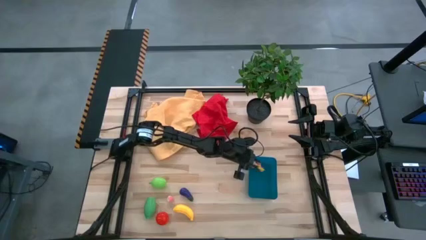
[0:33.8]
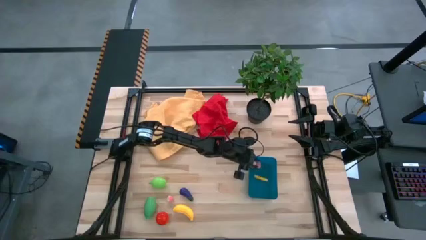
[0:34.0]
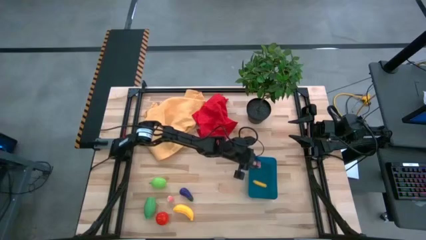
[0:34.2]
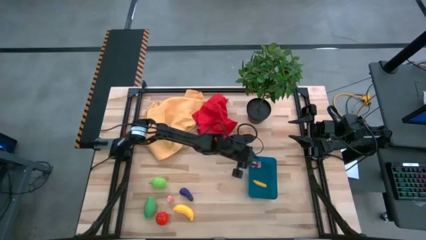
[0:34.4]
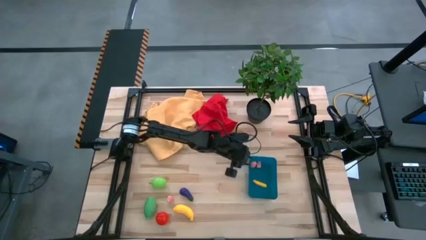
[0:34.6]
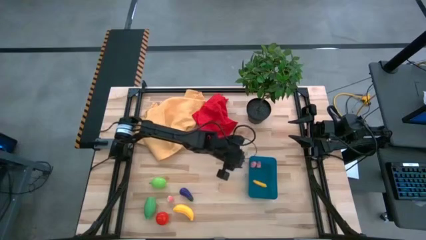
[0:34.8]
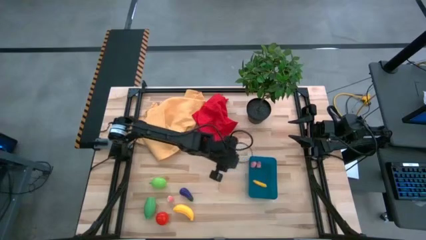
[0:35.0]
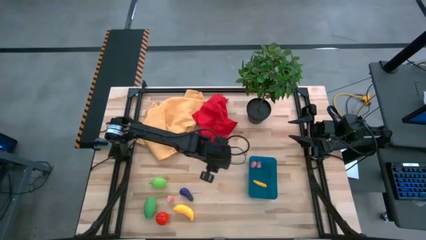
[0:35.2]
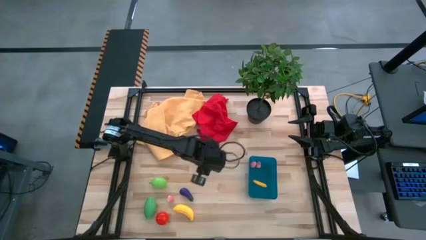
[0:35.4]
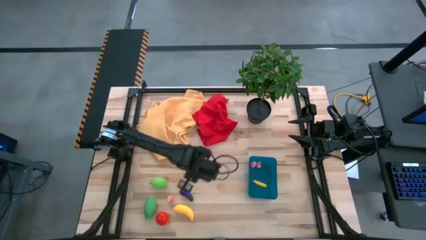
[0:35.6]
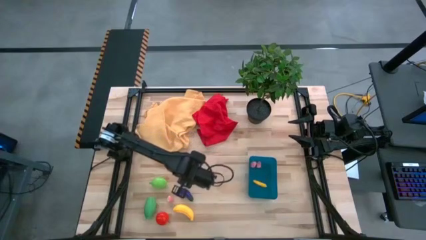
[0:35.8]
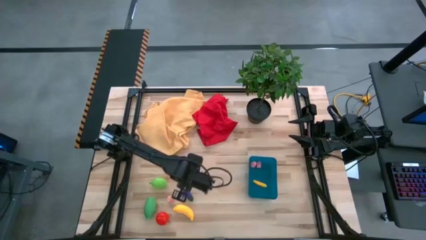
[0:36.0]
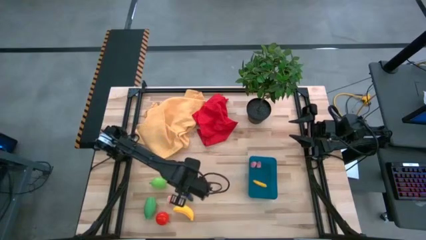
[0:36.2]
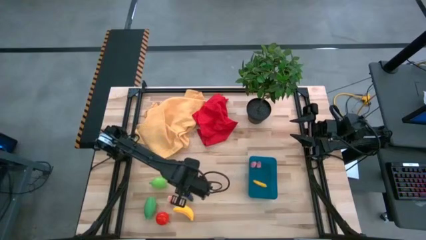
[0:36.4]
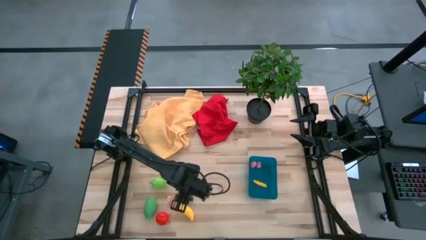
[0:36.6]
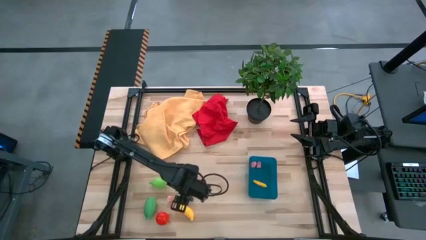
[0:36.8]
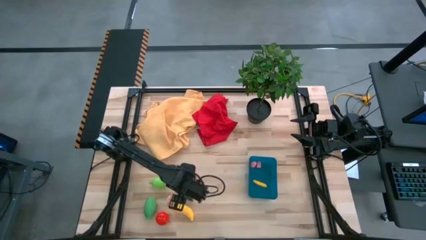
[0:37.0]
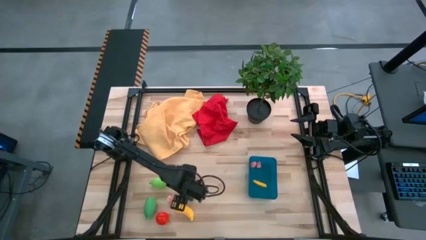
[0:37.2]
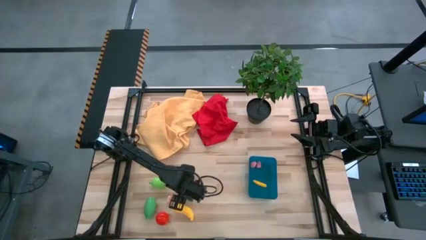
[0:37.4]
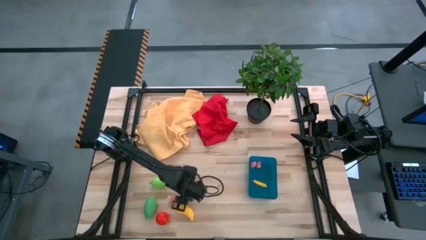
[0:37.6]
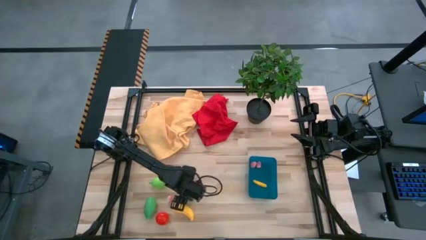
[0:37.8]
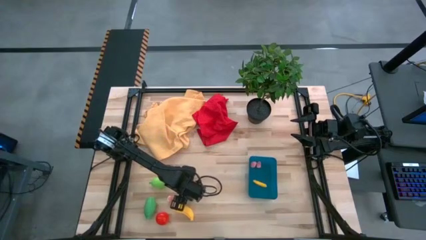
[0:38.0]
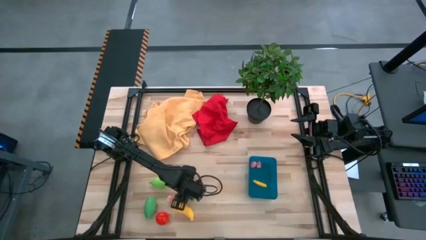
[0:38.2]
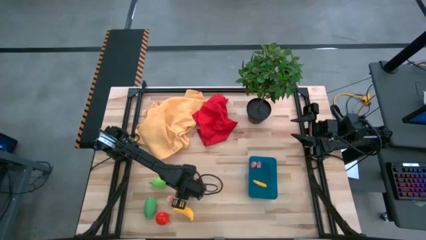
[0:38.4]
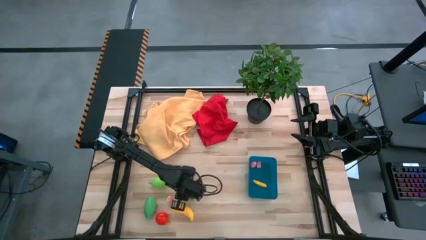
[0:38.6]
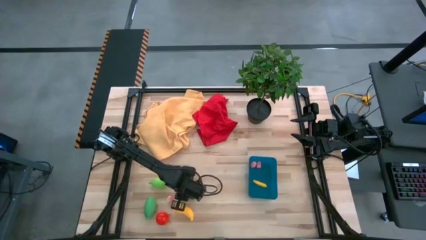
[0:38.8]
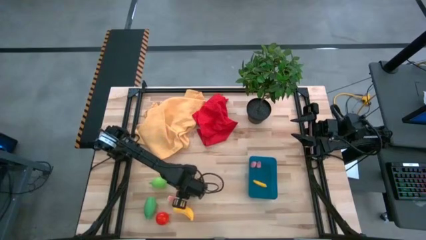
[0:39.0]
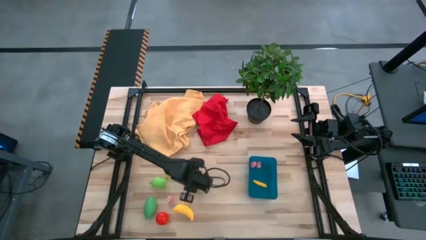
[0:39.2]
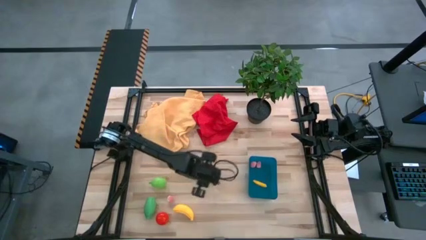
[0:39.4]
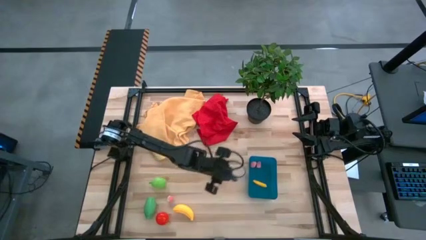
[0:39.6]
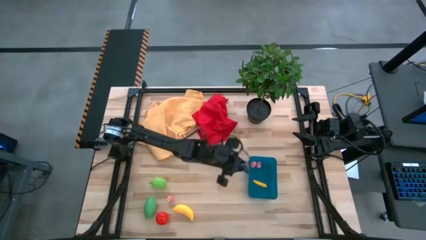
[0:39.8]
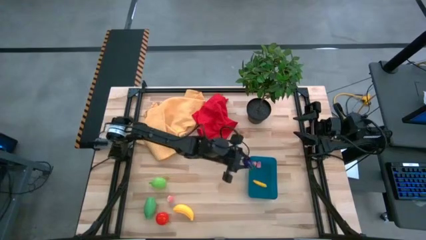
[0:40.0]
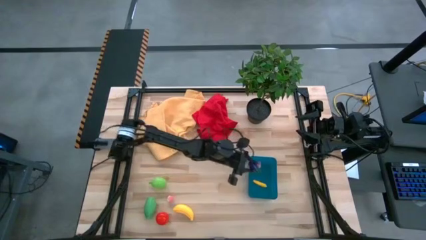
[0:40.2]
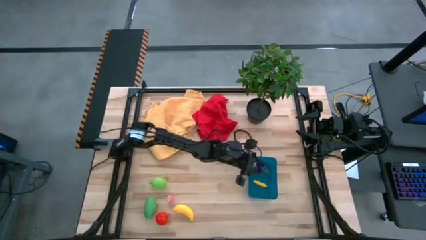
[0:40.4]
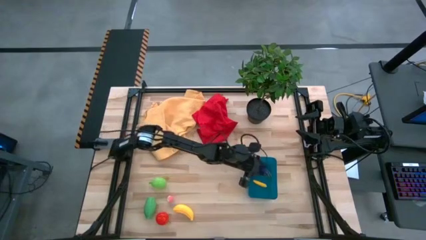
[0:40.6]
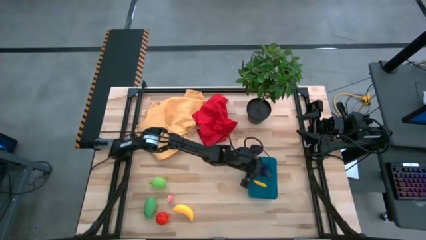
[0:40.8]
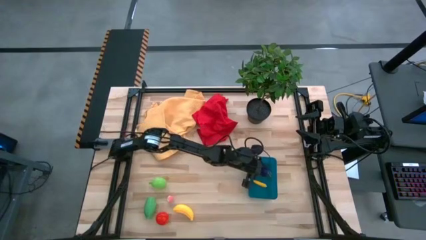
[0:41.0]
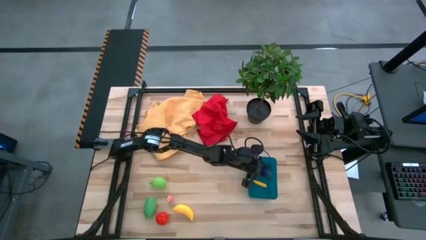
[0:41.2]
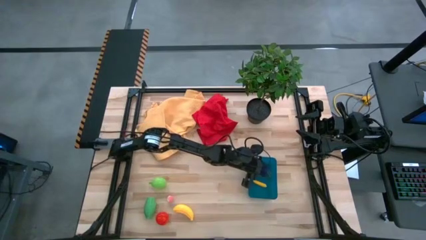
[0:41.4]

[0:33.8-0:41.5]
Task: Pick and placing Produce into tupperware
Put the eggplant into the blue bin

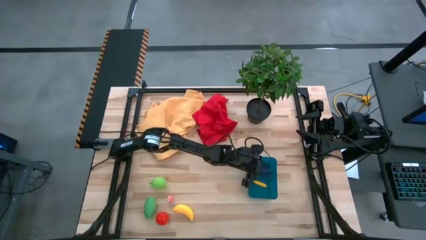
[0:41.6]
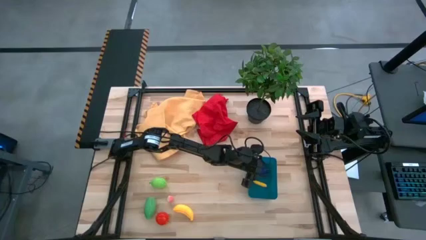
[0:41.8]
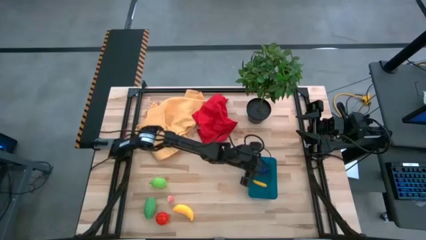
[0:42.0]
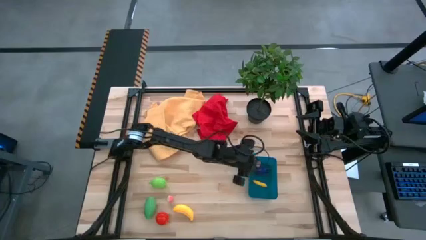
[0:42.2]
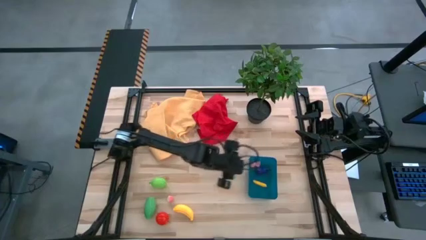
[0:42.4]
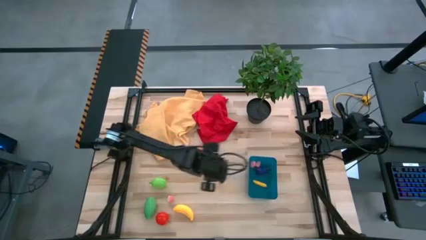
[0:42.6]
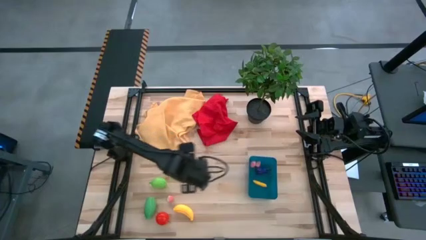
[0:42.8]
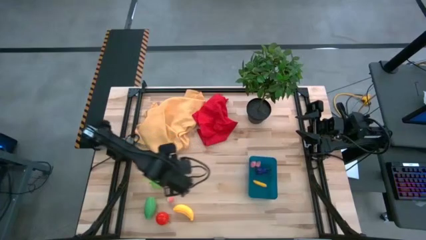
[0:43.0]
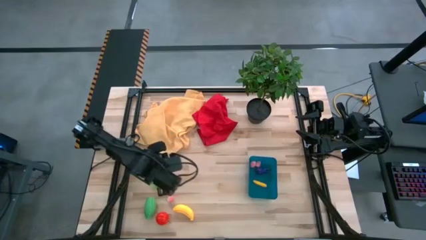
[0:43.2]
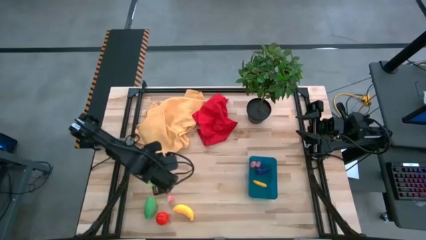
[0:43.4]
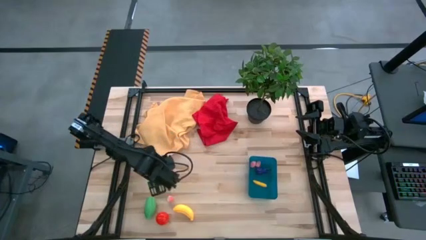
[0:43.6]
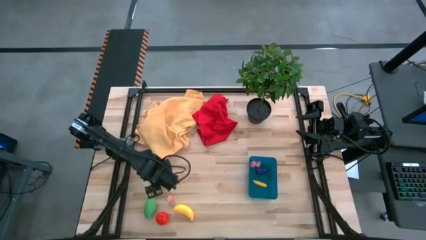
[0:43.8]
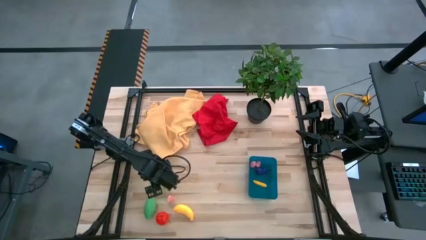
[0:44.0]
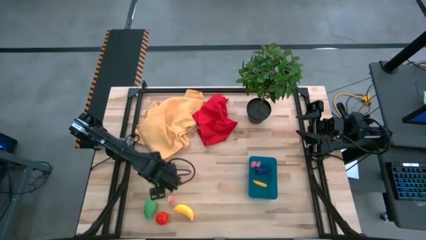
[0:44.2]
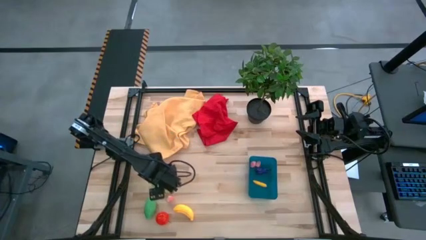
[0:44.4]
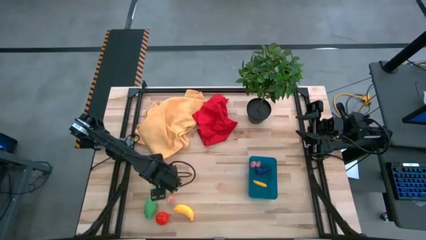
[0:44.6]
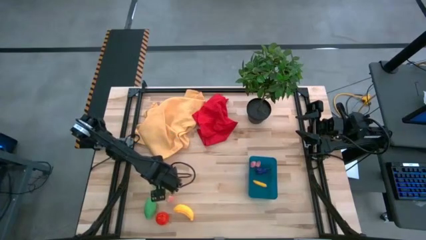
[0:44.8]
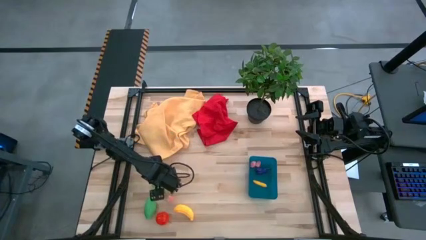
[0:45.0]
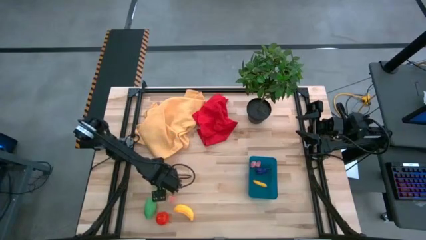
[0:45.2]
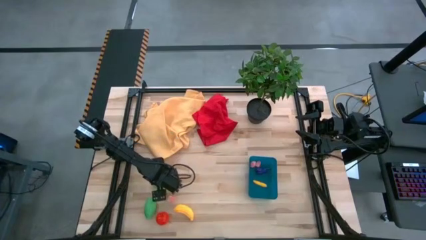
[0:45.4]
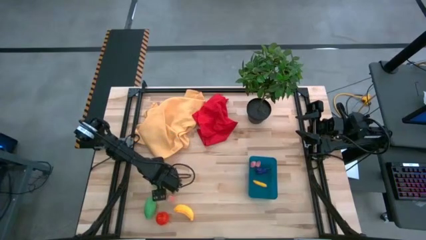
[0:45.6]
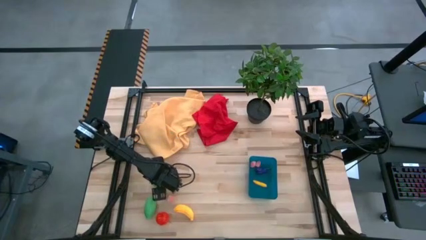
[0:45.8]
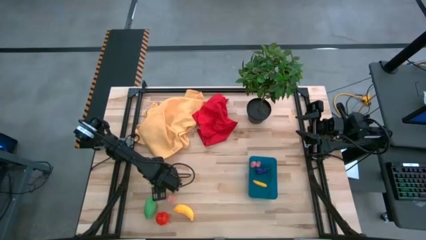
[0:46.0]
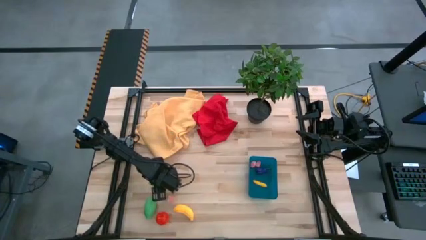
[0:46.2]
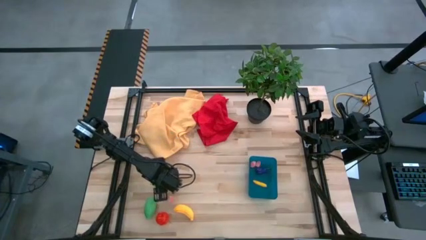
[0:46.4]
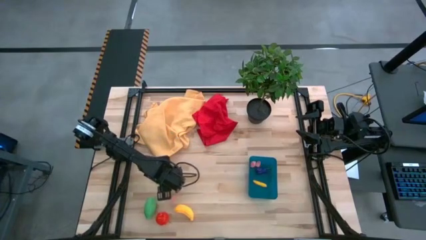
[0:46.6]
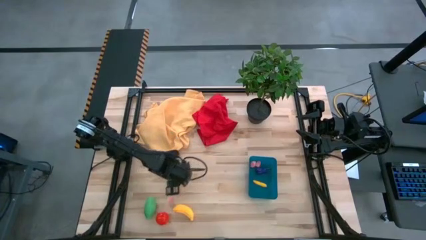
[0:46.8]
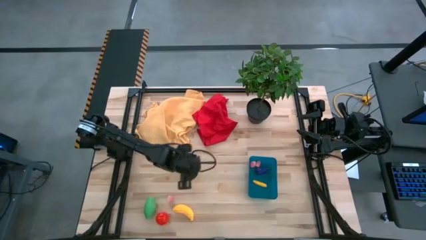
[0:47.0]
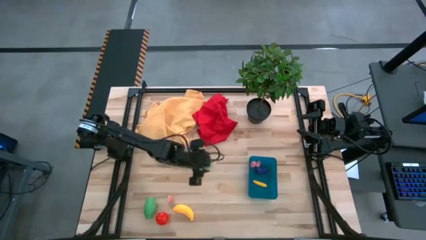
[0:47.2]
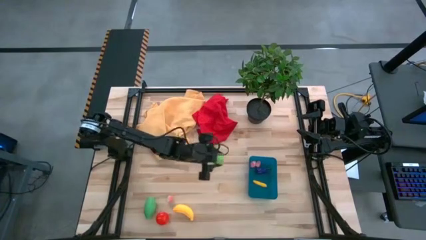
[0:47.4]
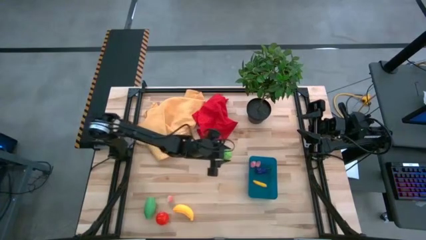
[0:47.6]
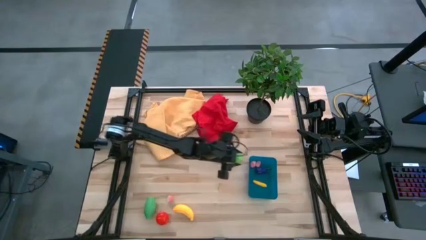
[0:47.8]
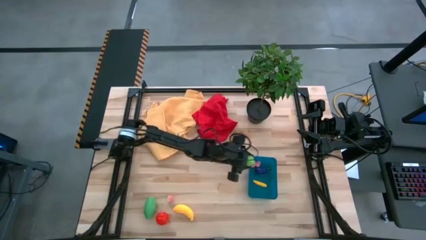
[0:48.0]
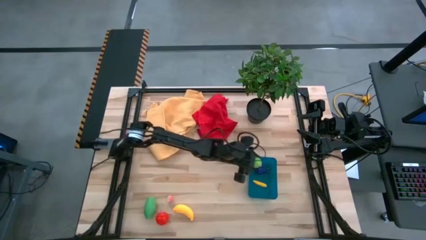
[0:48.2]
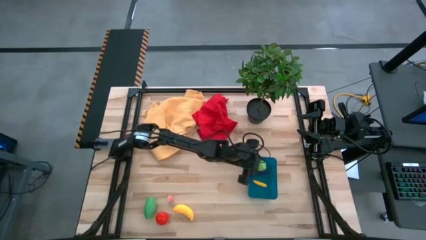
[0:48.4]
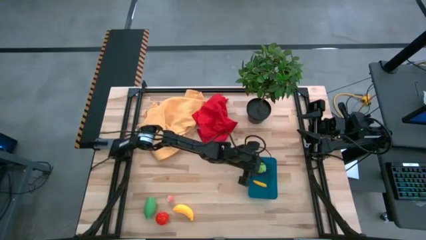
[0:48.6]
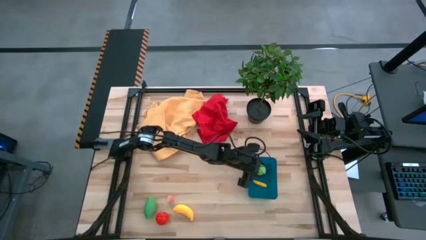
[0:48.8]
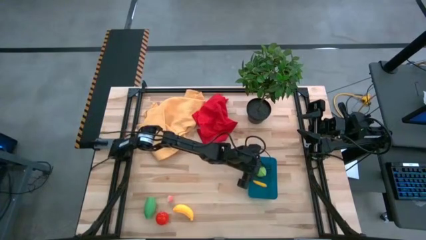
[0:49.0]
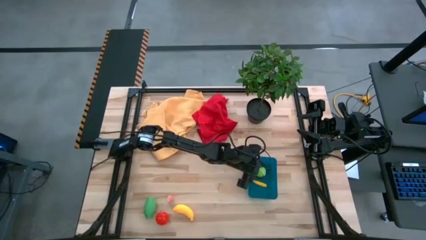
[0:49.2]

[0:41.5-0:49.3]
Put the melon into the blue bin
